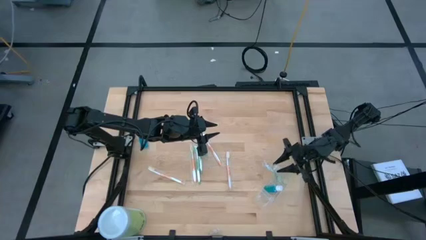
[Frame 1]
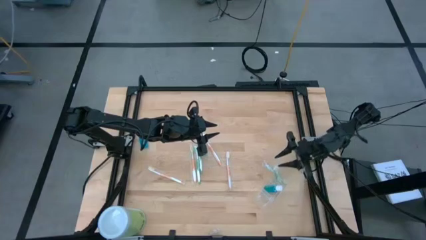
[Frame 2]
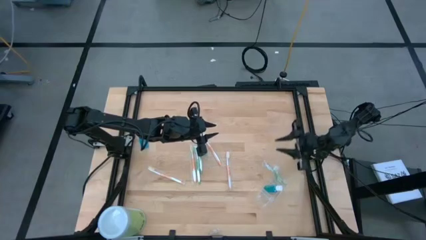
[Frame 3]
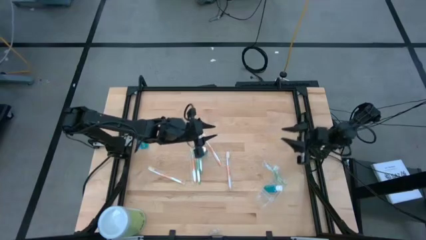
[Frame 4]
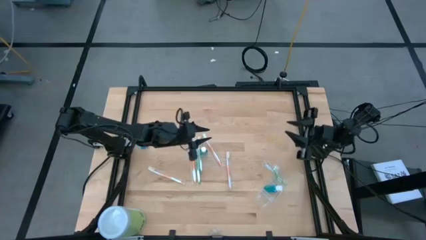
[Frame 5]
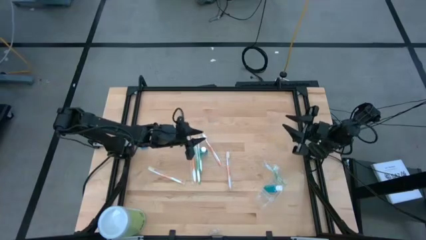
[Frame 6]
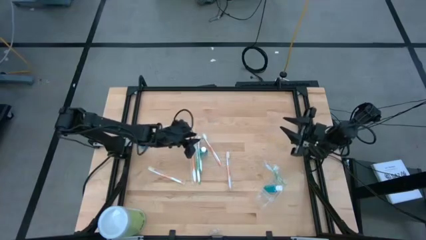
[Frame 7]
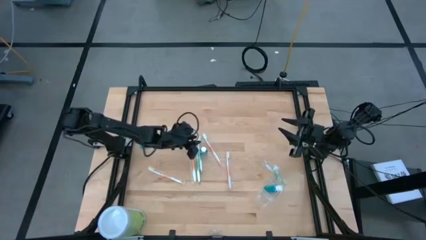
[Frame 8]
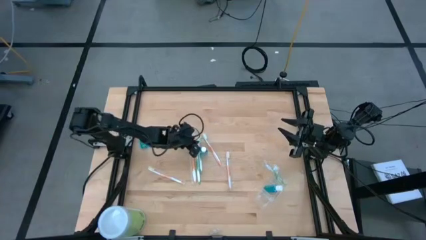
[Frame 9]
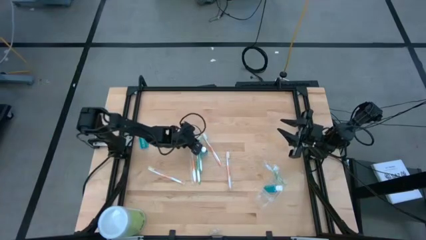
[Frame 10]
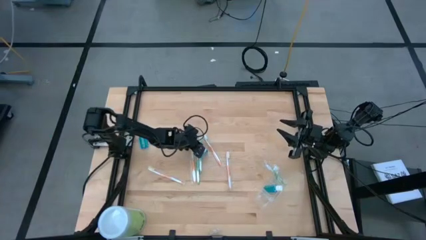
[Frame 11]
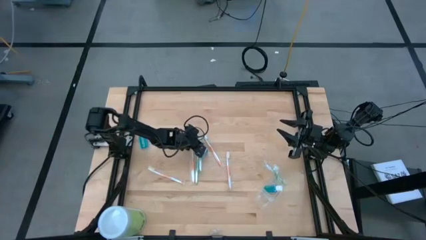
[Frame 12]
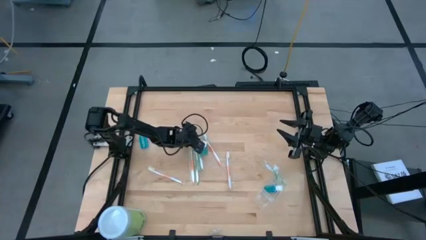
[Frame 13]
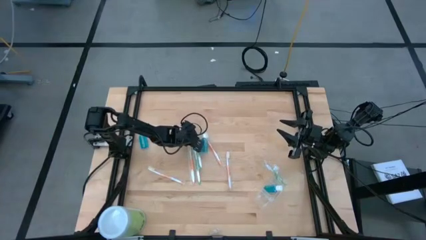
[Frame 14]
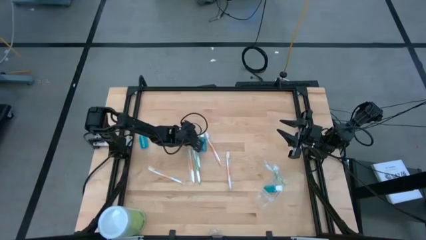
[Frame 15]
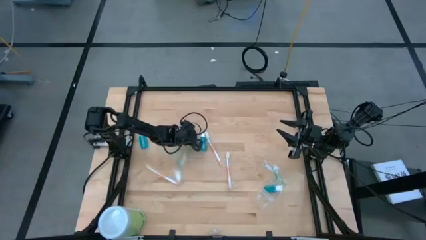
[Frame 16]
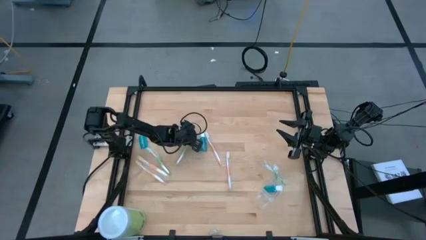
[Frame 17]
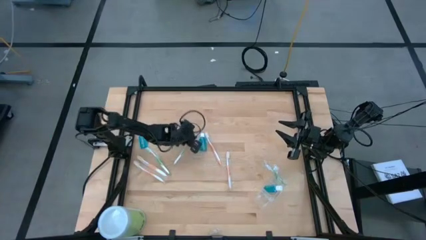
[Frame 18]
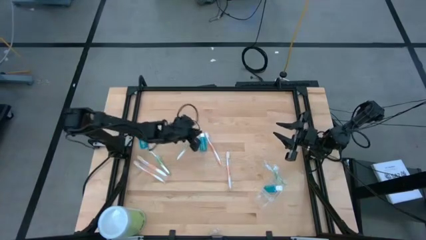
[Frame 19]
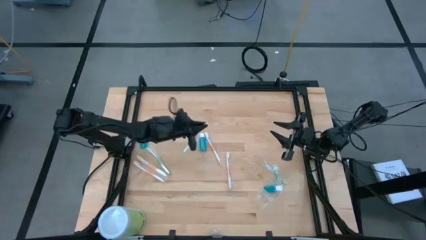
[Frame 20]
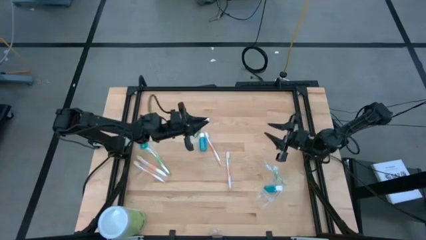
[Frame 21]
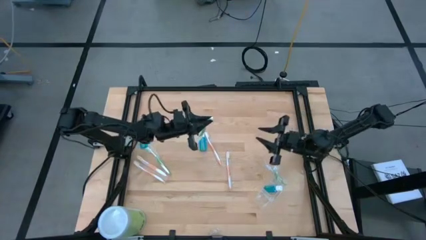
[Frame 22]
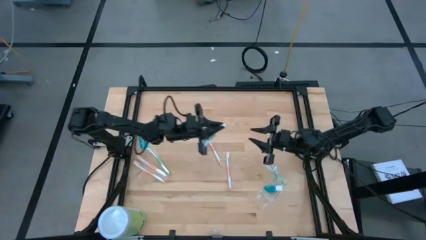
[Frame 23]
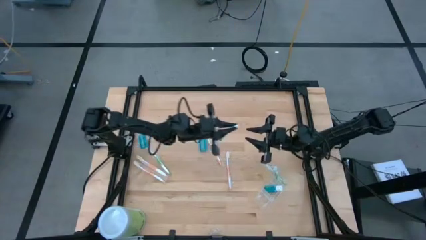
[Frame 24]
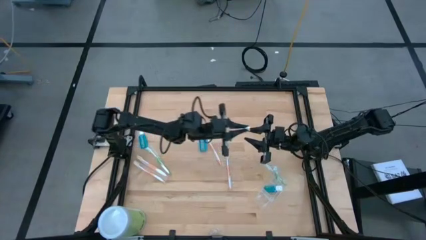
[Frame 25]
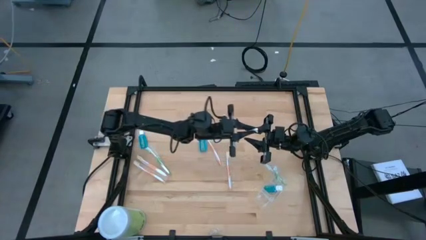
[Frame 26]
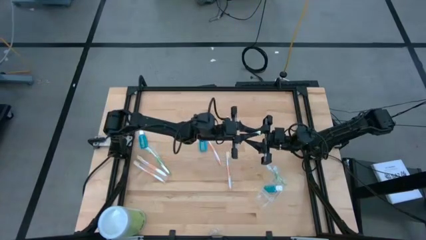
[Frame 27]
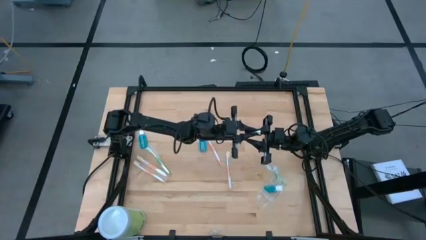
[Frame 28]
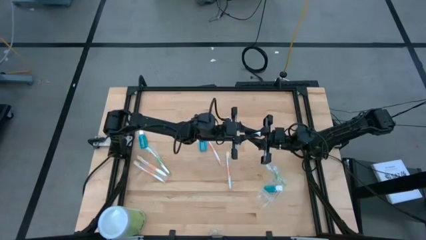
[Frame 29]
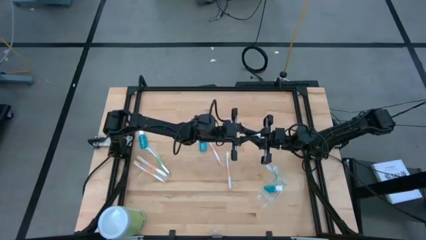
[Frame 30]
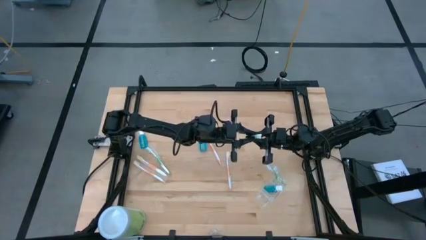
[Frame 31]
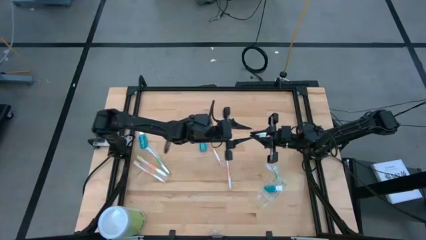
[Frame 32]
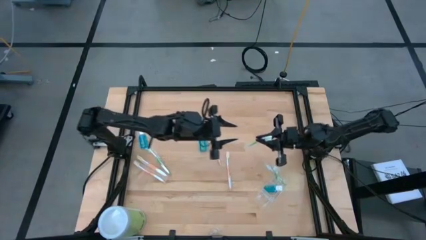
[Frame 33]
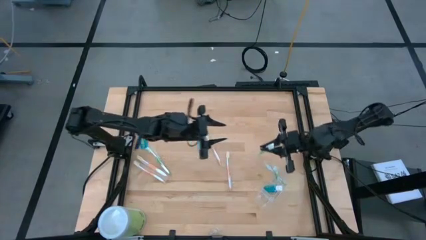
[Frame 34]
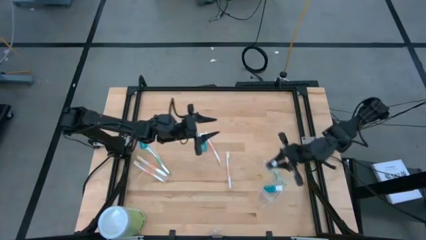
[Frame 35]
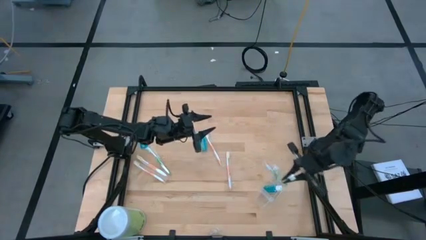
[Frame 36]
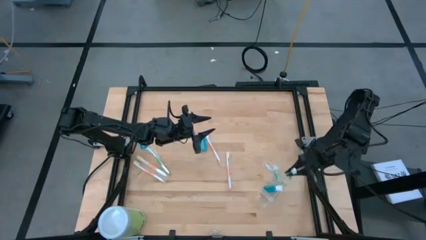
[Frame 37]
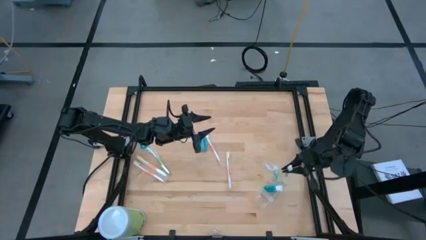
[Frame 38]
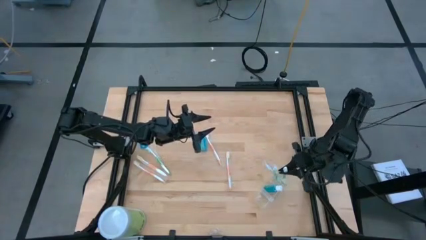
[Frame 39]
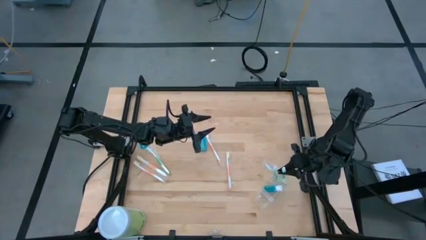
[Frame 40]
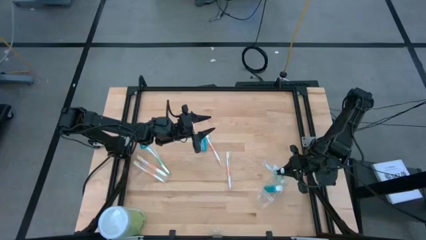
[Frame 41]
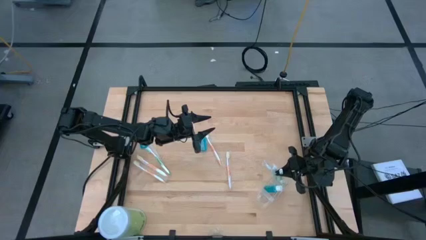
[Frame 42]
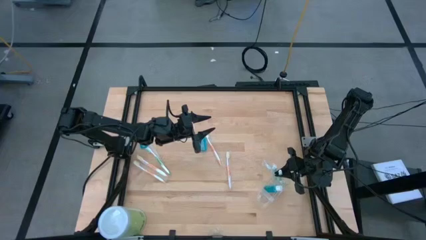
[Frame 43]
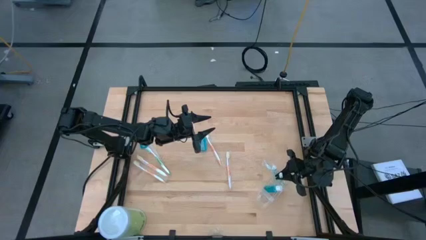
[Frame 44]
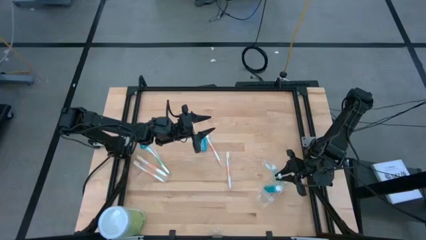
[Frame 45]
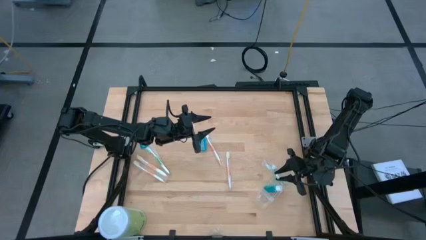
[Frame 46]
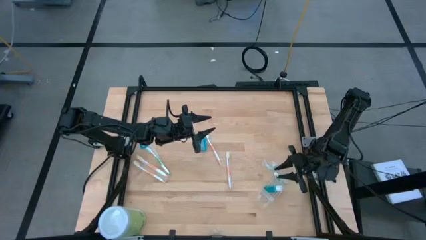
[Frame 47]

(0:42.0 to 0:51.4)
Task: Pick & Place toothbrushing station
Put the green toothbrush into the top section of the transparent organizer
